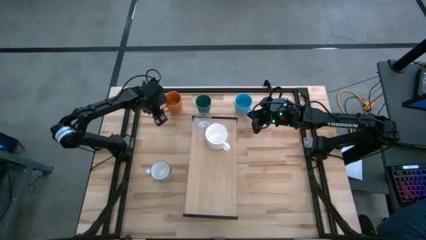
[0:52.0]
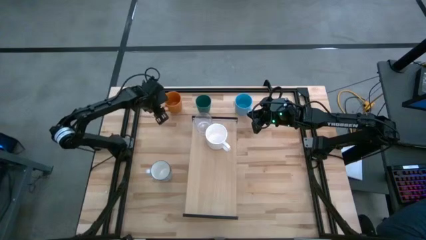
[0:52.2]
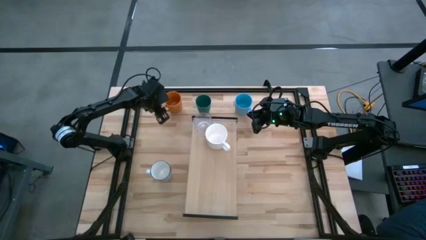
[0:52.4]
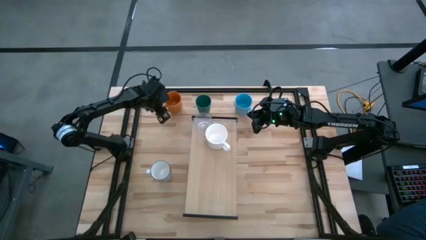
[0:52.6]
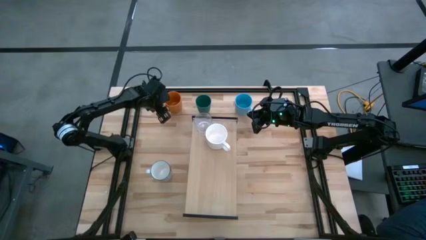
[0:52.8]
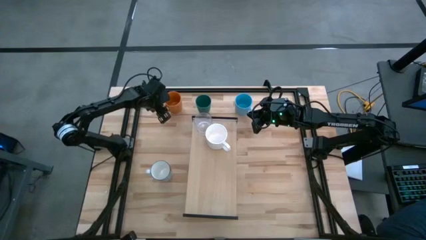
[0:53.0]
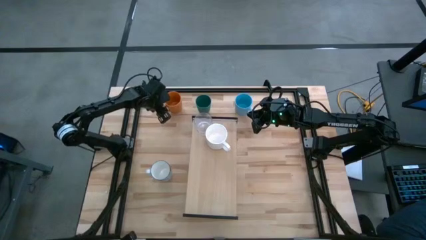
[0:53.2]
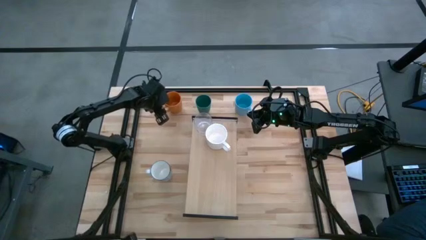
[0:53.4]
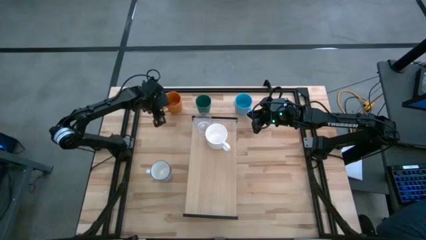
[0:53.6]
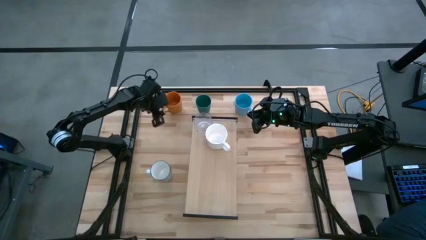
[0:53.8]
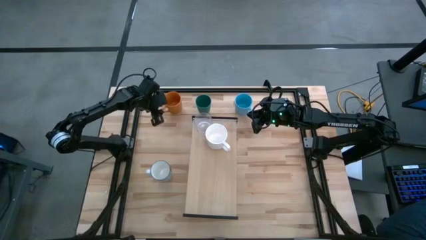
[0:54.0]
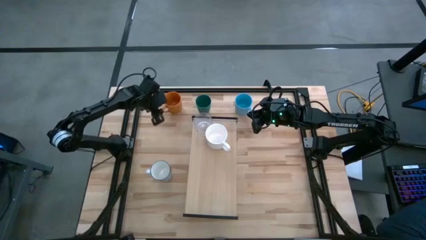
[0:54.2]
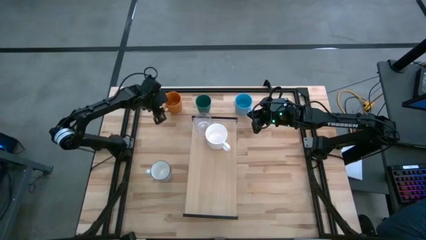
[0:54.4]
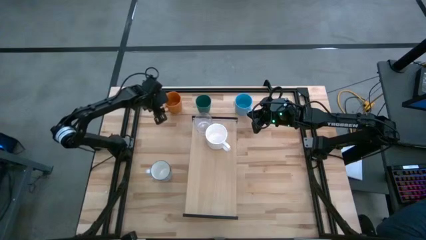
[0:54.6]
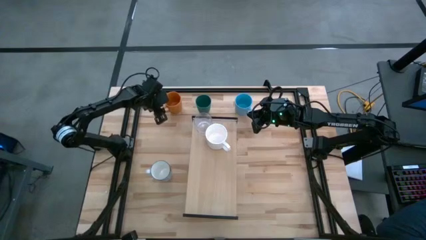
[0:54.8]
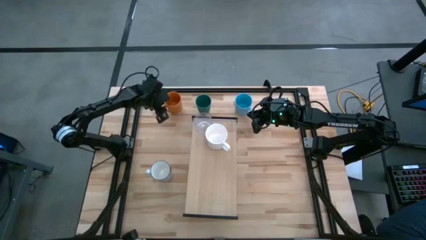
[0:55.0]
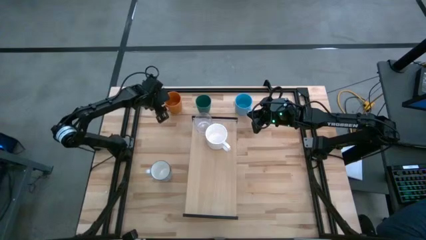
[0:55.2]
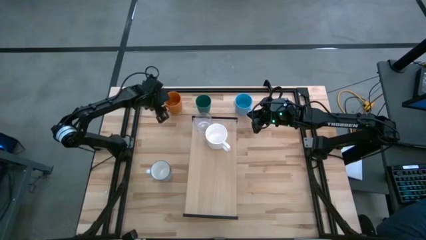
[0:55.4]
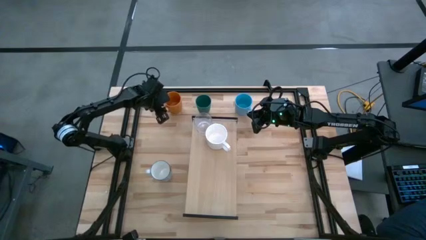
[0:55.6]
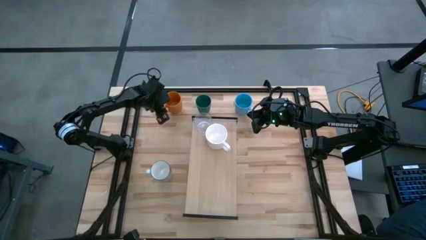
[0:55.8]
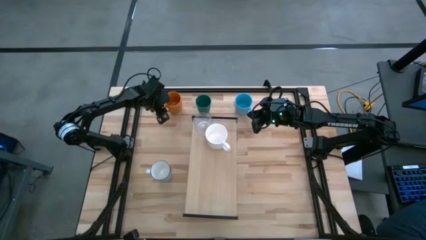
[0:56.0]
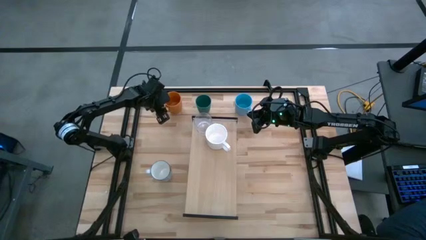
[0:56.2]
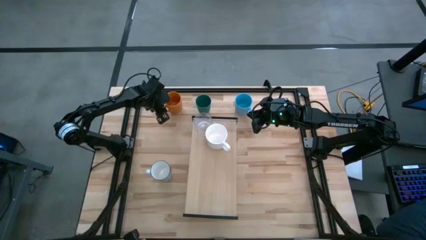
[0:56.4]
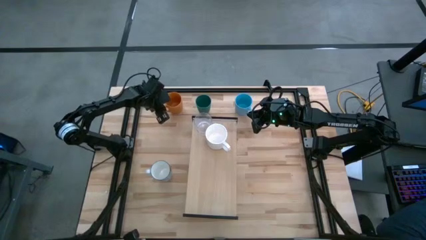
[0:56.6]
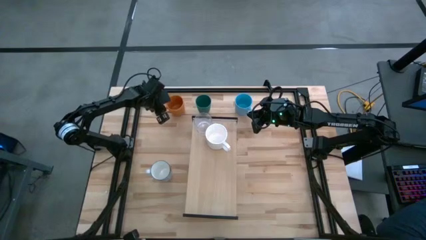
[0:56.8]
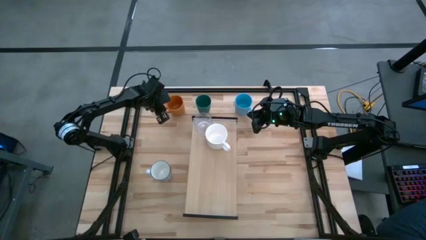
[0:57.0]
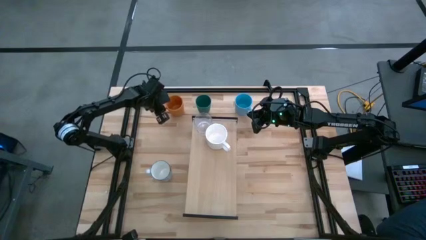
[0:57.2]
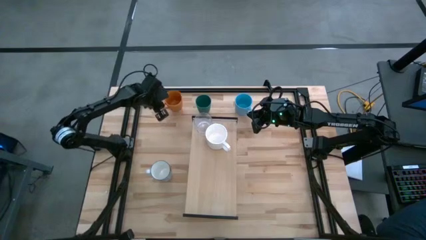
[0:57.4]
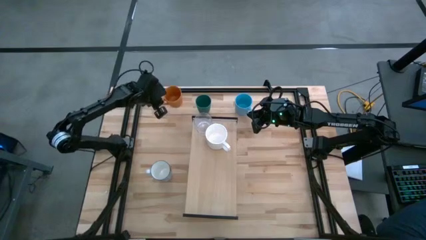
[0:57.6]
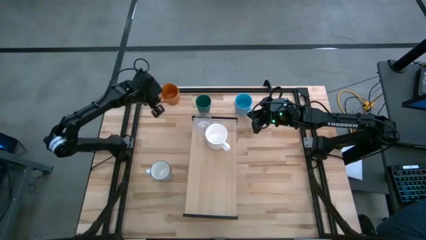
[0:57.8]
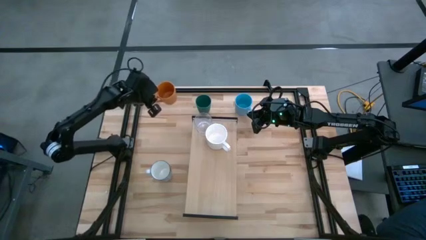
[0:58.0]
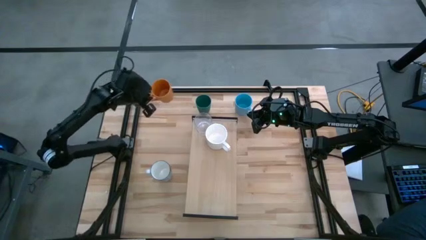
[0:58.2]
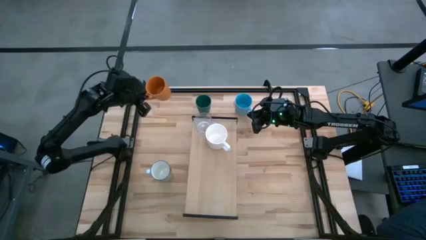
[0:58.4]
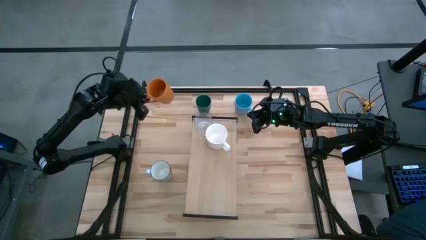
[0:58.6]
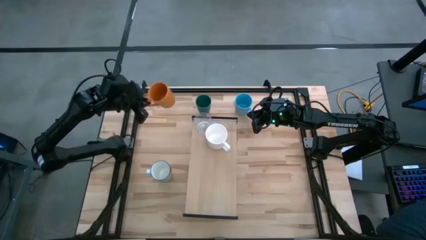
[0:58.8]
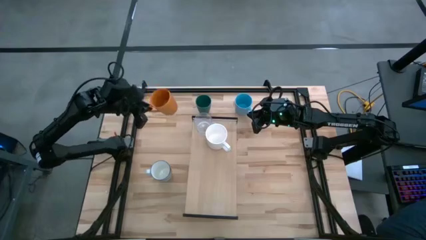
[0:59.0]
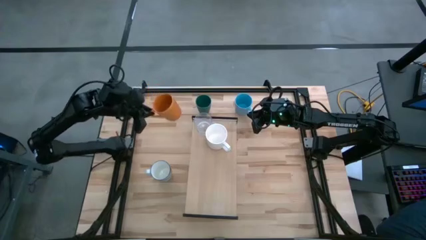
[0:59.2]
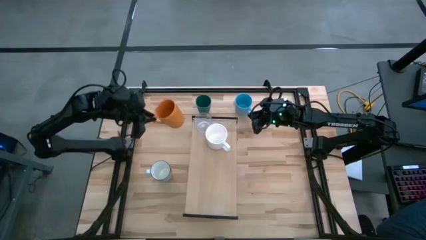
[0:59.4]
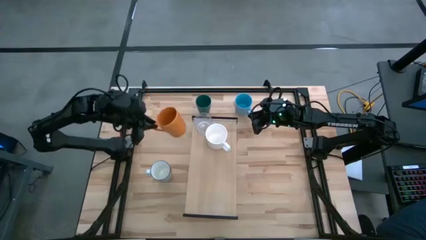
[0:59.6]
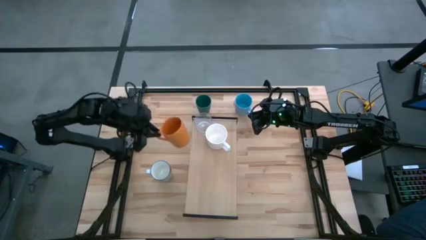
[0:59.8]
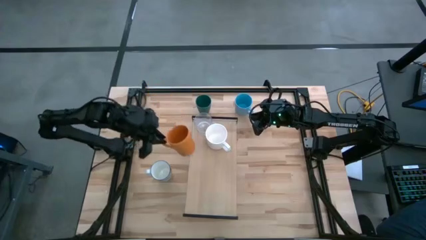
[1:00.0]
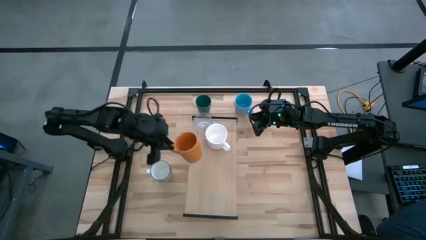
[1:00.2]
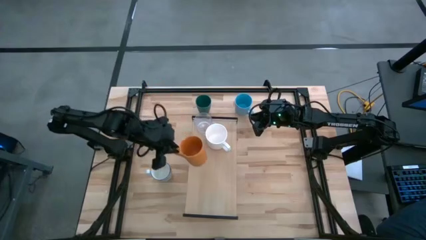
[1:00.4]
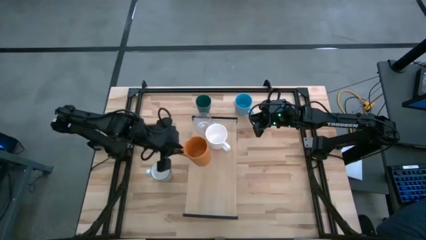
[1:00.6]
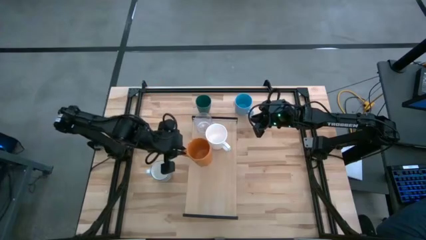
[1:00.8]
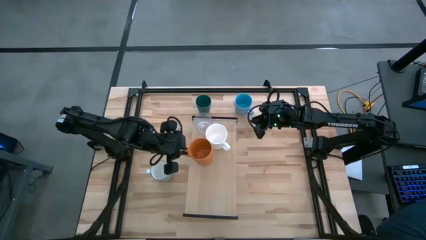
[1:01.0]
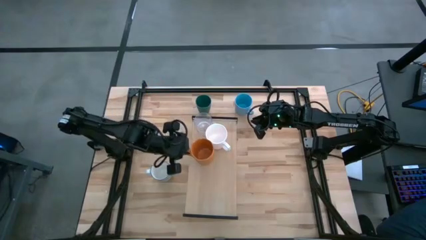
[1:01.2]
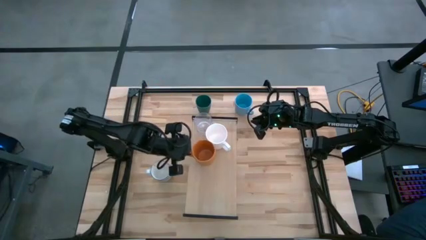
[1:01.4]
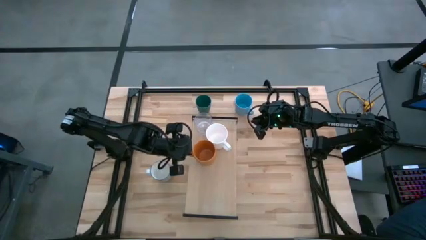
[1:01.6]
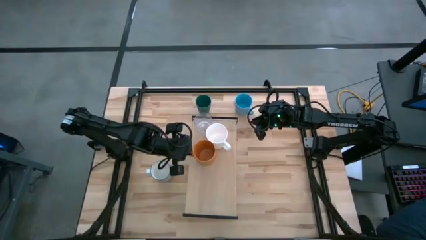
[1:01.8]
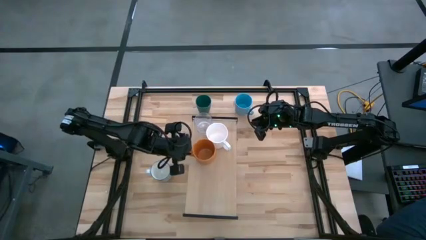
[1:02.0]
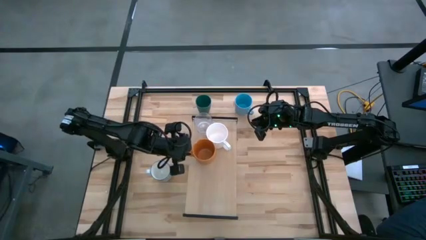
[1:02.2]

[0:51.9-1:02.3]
Task: Stack small to large cups/mugs on shelf
Put the orange mug on the shelf
